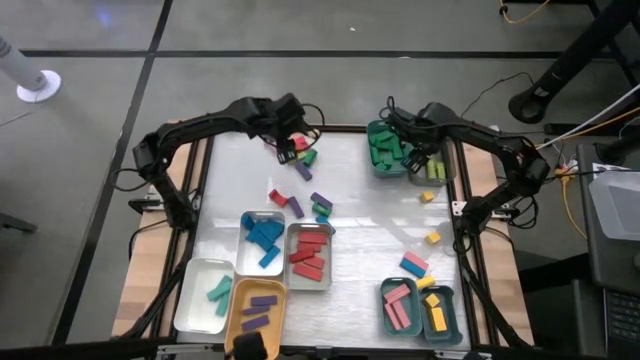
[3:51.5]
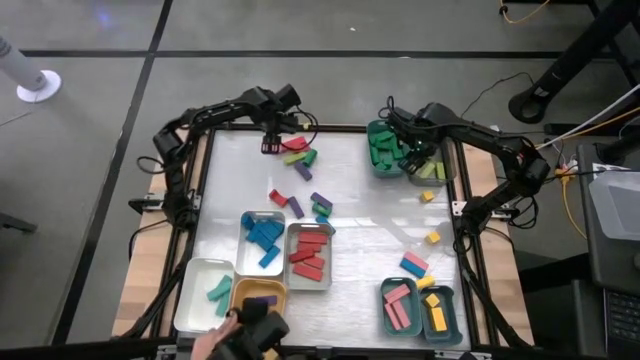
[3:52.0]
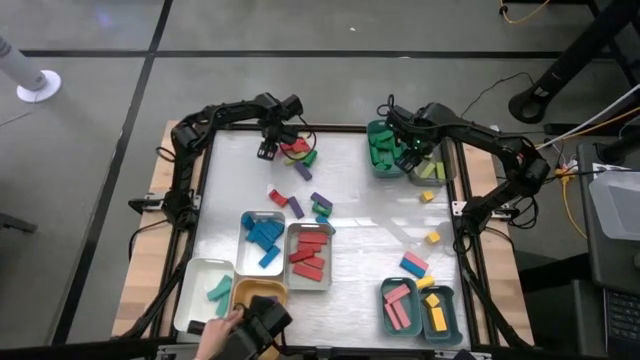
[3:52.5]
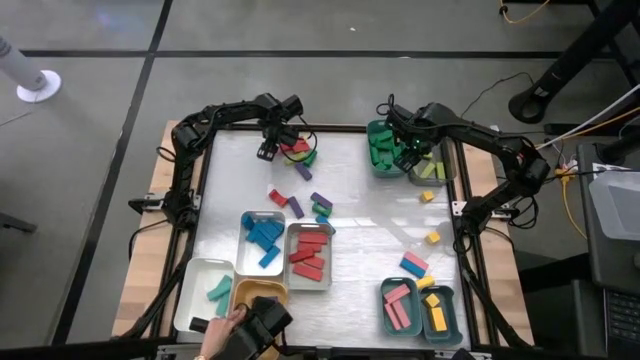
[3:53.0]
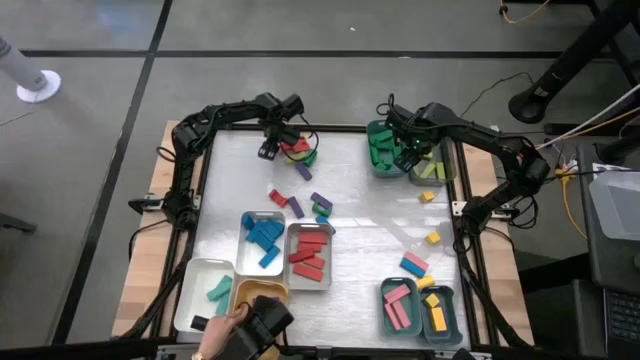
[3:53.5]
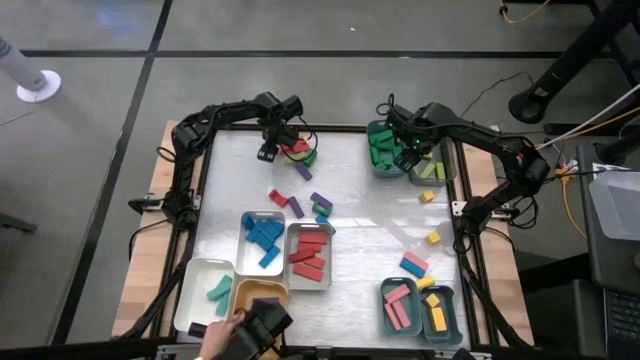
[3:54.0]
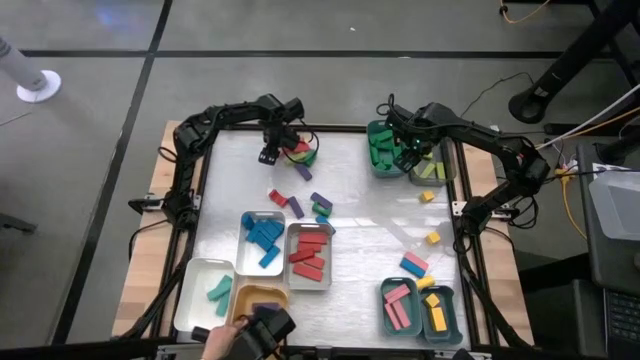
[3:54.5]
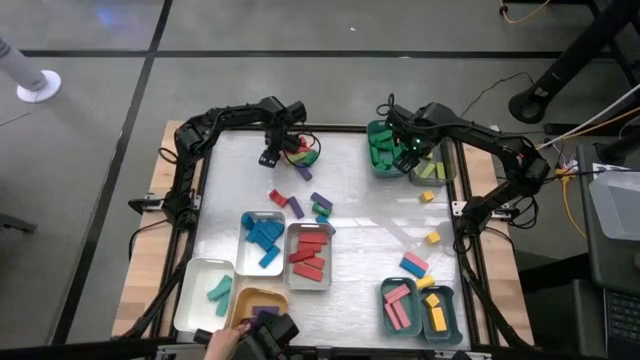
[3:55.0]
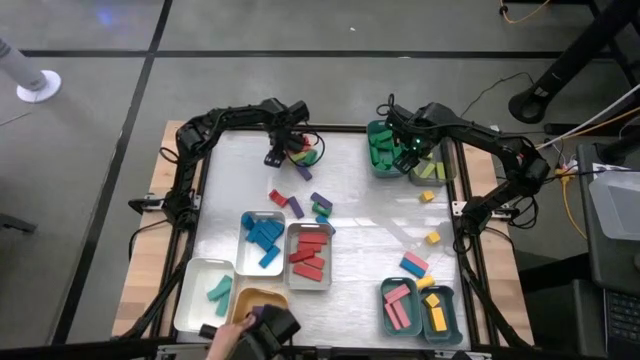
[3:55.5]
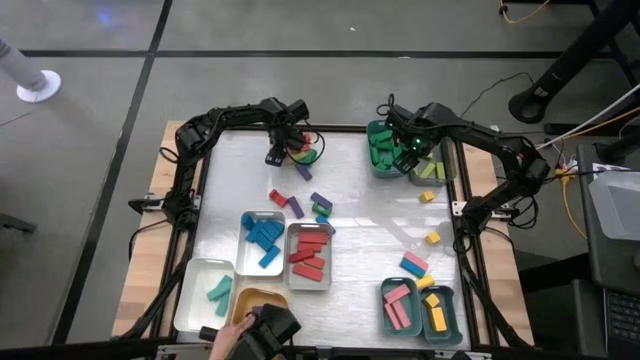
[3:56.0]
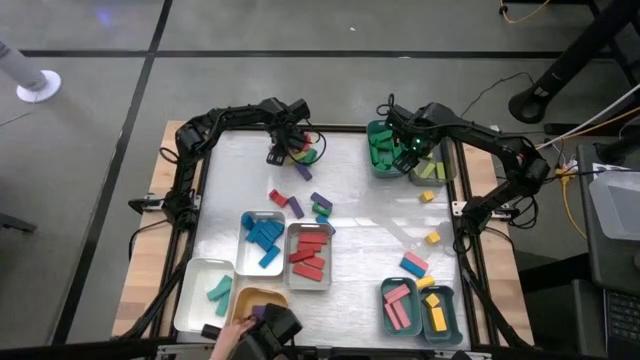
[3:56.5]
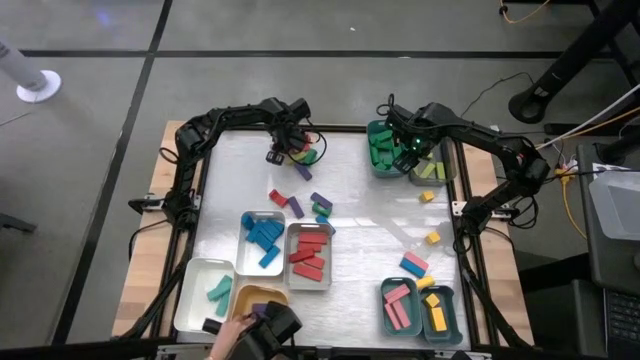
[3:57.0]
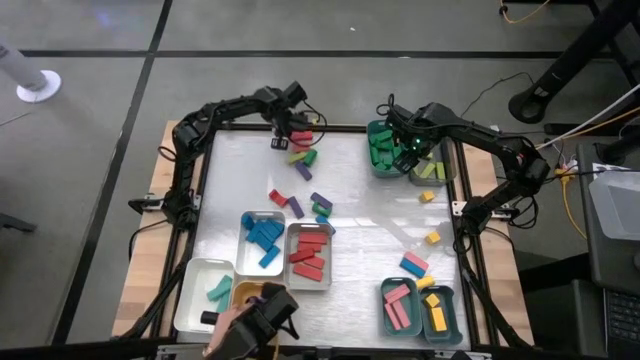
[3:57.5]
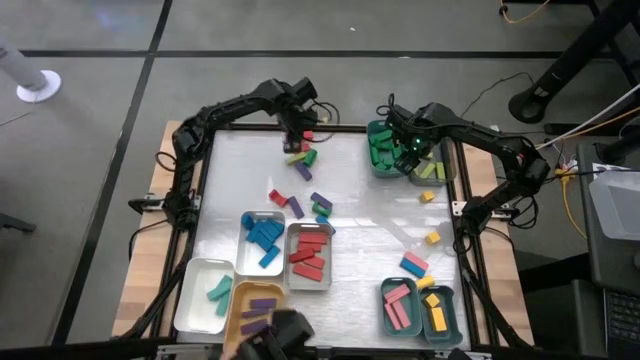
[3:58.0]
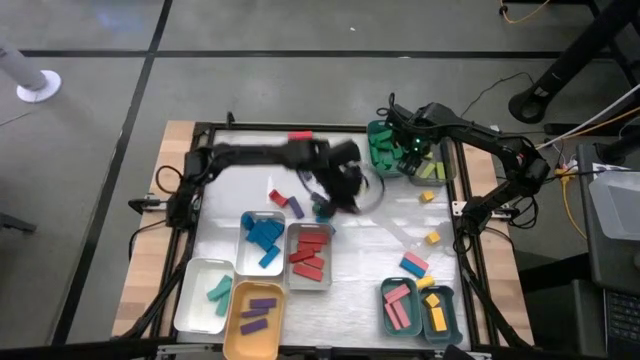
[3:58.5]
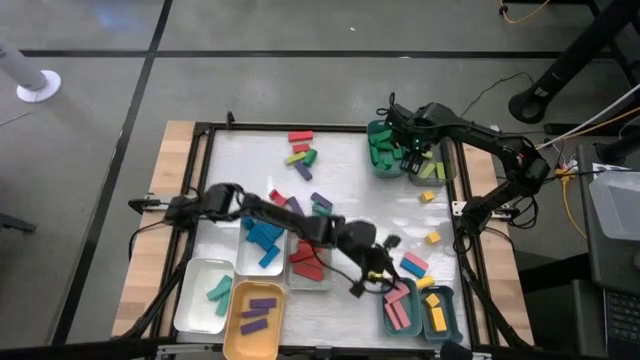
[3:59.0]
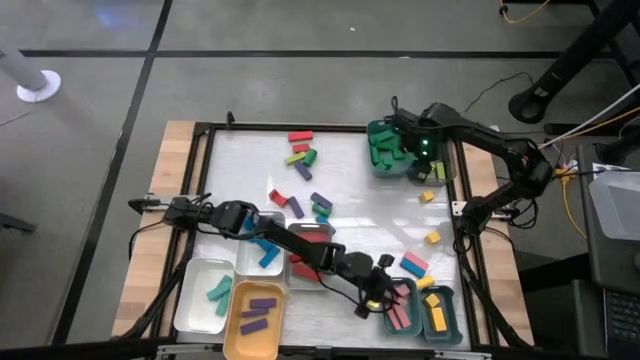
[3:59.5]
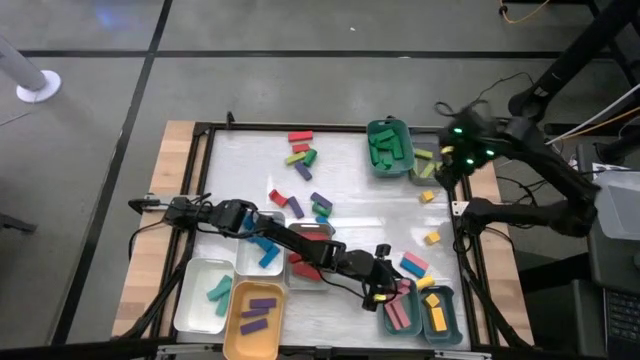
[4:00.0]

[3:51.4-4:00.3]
Task: Sort blocks
Put the pink block into the bottom green bin

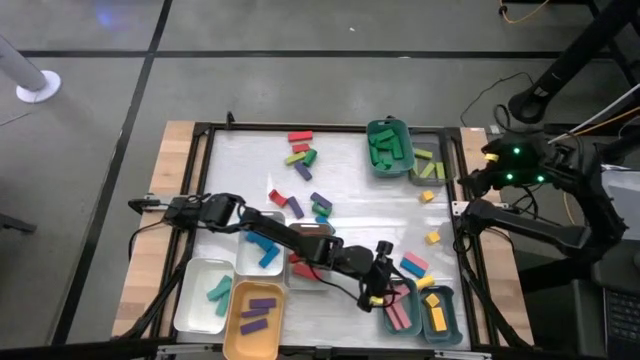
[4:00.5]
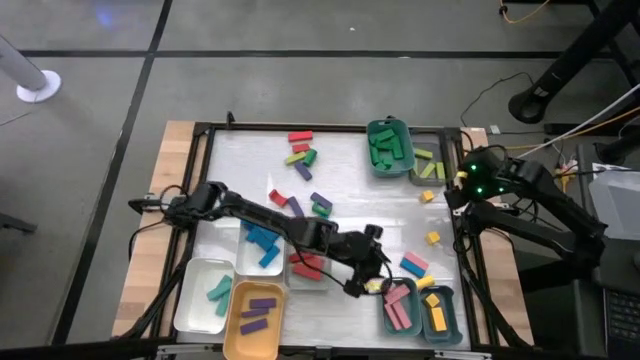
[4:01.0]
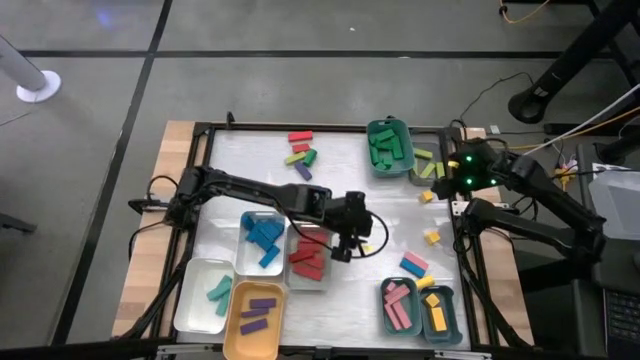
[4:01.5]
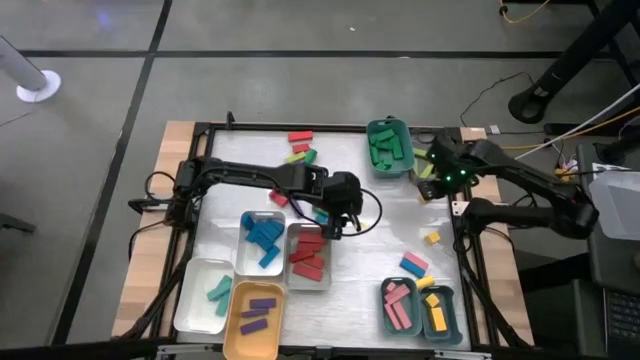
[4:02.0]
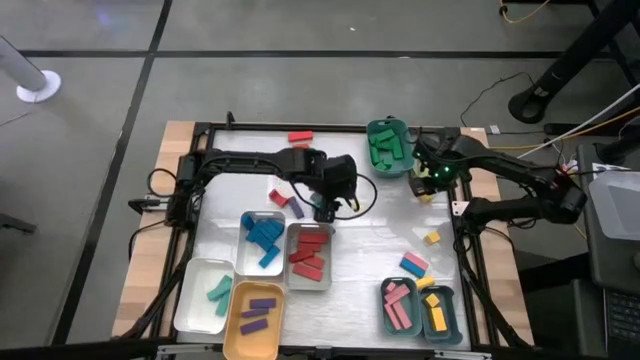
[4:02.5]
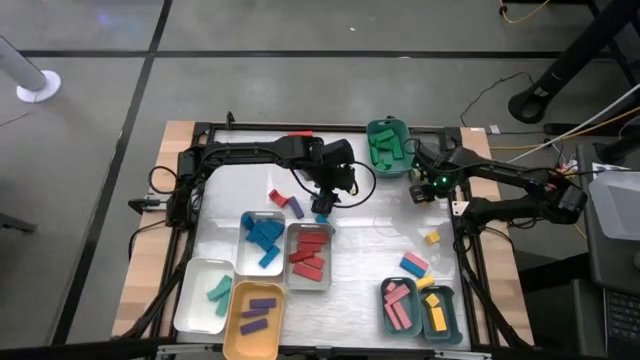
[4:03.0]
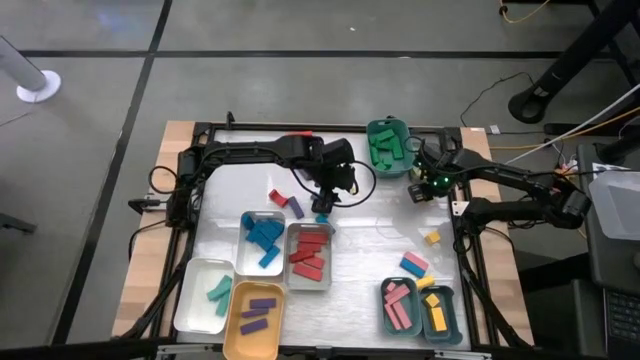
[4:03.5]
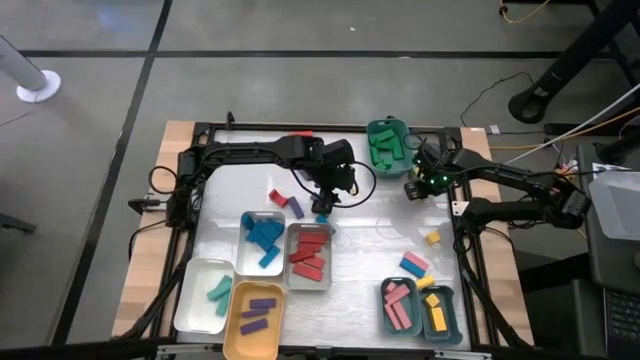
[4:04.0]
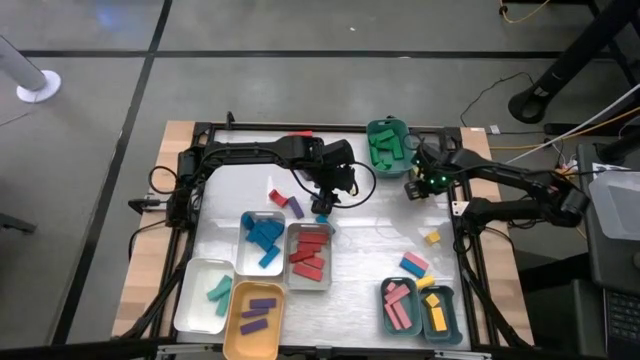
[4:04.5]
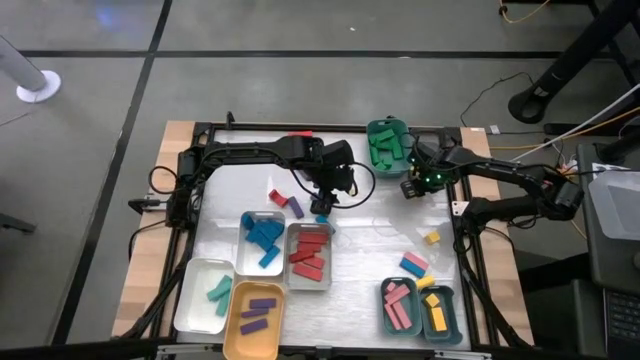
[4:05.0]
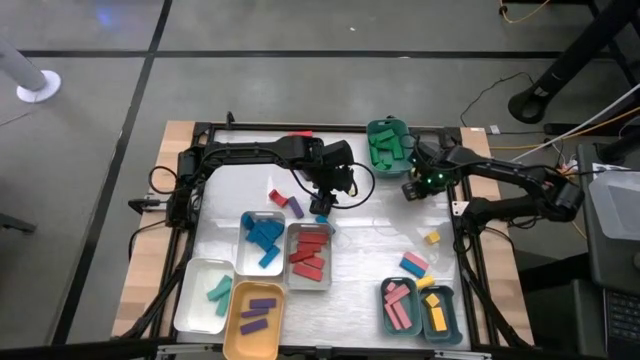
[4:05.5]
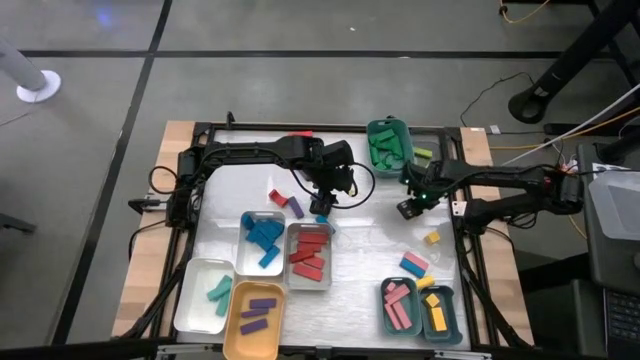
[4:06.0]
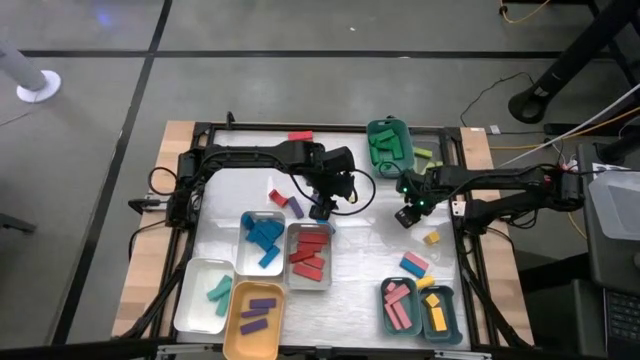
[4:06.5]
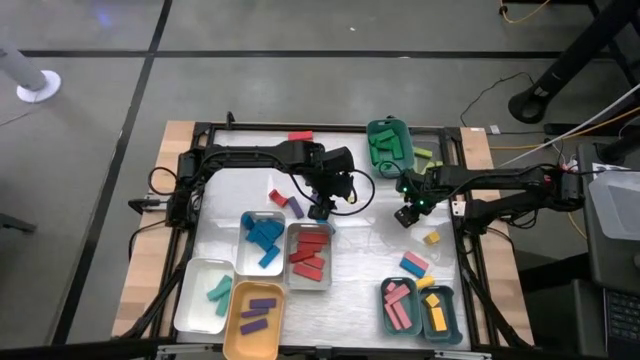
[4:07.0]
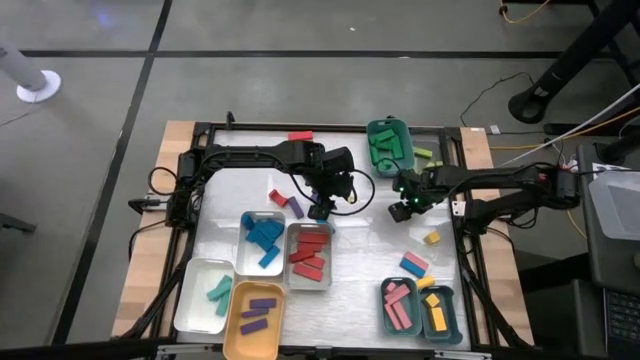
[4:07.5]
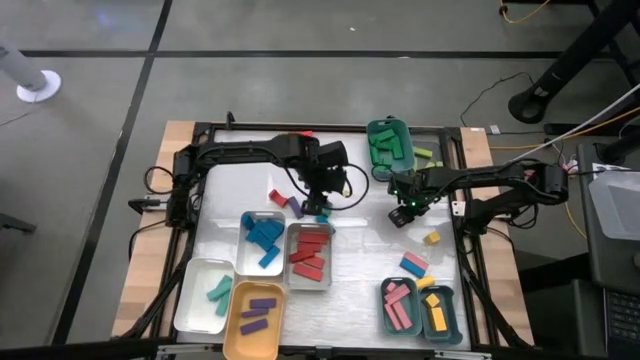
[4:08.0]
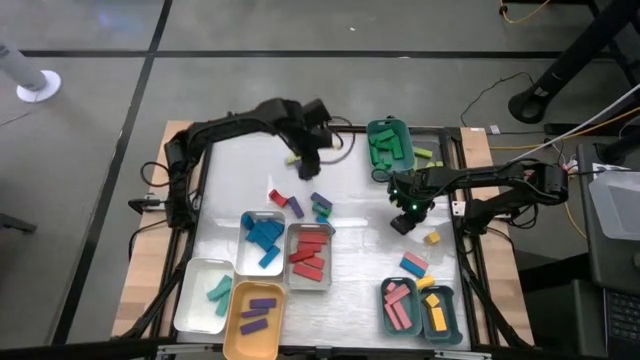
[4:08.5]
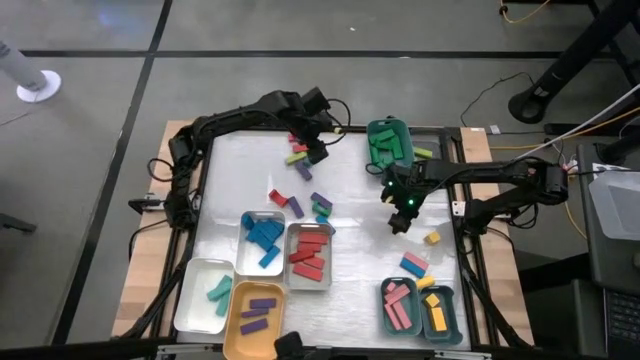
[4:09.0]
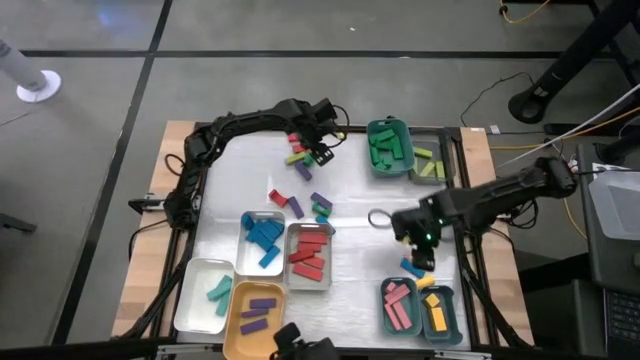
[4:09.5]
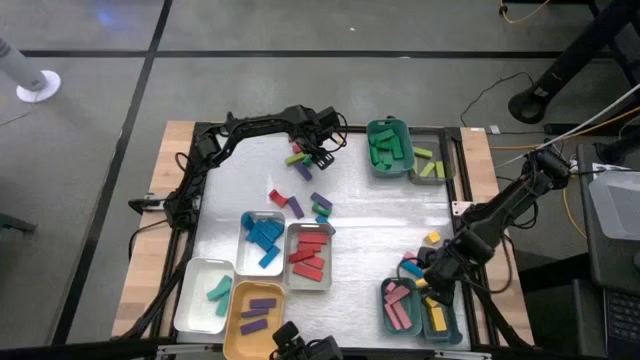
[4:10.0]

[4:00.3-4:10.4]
Put the yellow block into the blue bin

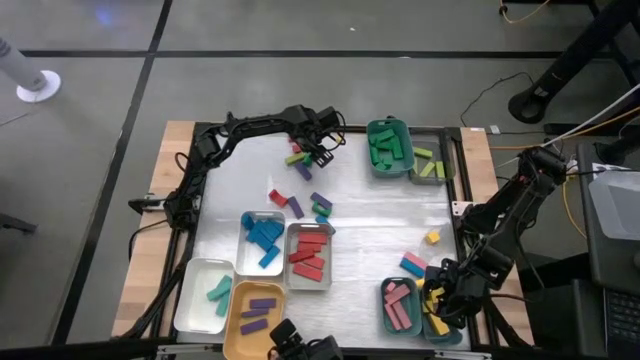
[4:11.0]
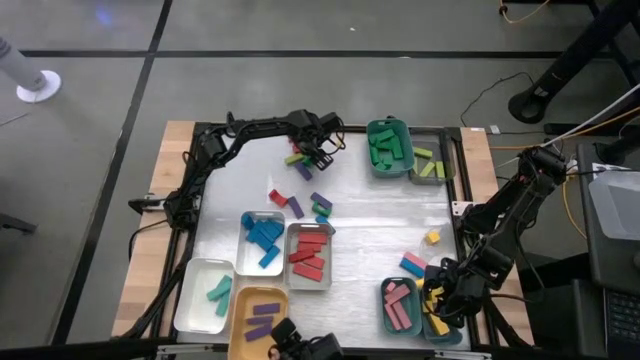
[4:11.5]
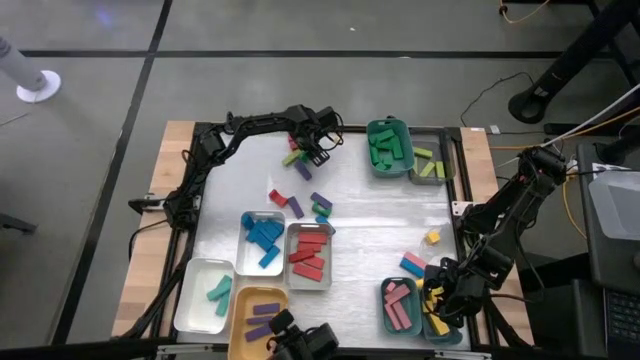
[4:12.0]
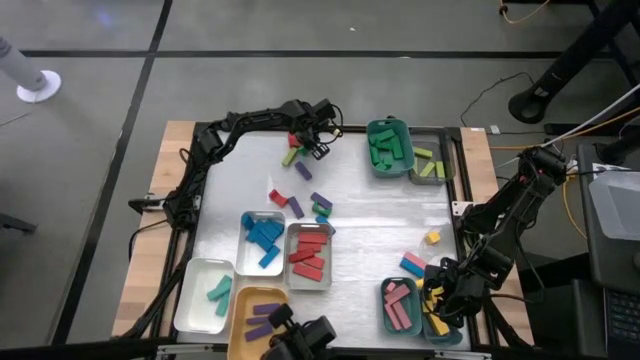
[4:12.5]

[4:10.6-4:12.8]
Put the green block into the top green bin

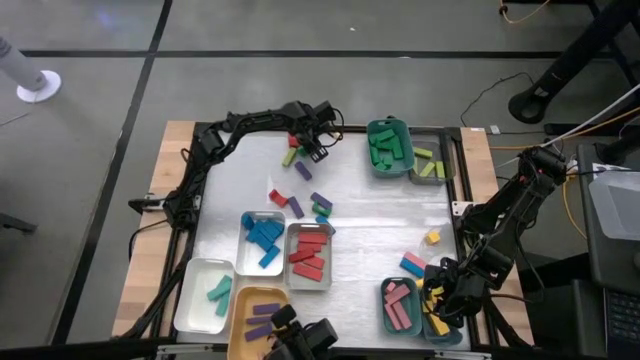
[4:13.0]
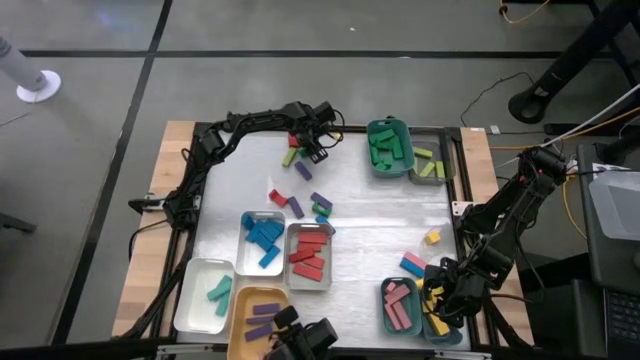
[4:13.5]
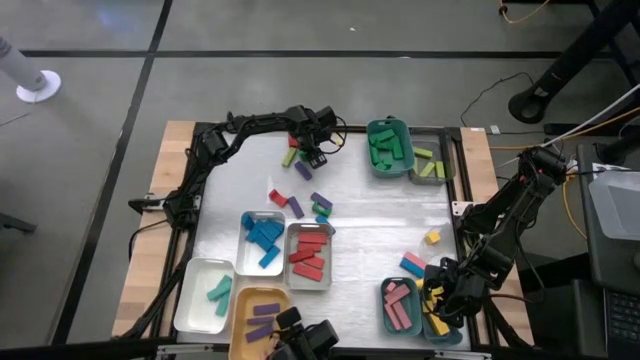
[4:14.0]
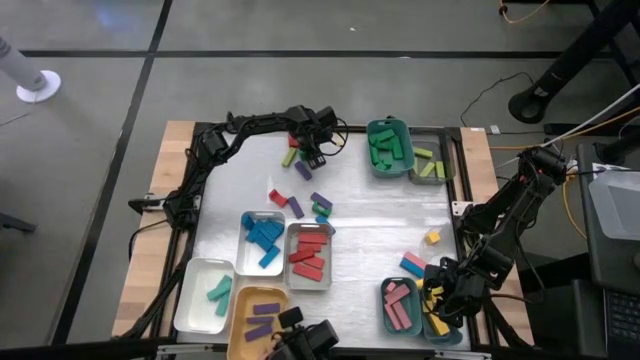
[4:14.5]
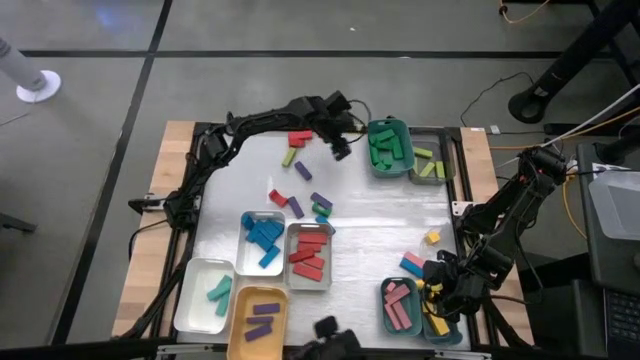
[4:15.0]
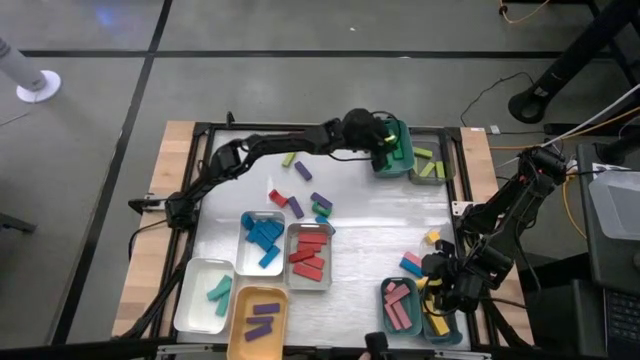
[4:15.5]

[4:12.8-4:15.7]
Put the green block into the top green bin
